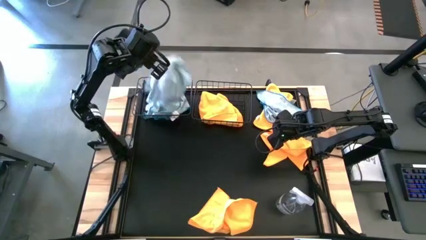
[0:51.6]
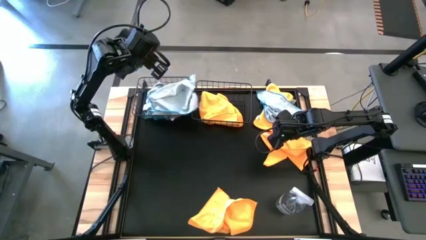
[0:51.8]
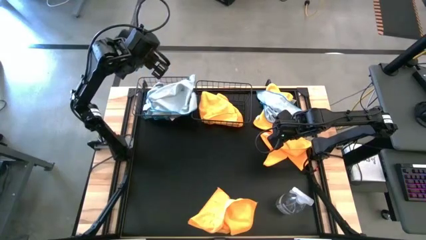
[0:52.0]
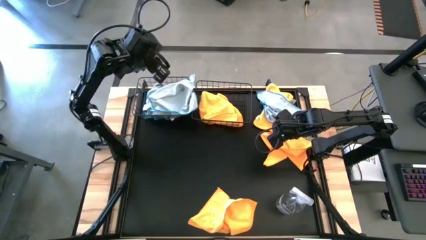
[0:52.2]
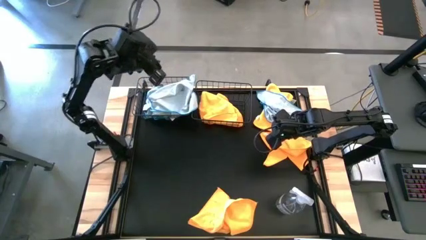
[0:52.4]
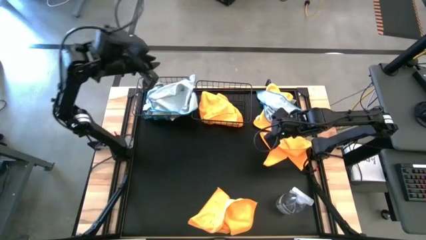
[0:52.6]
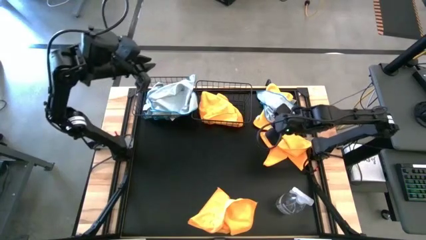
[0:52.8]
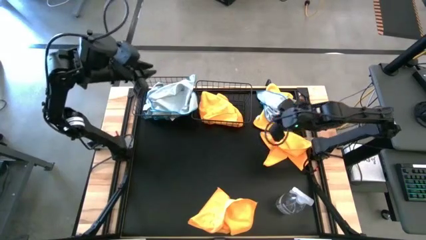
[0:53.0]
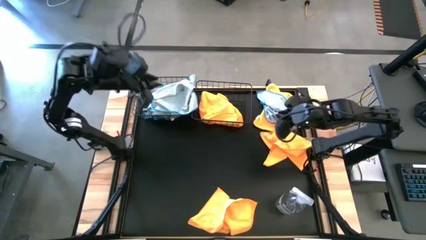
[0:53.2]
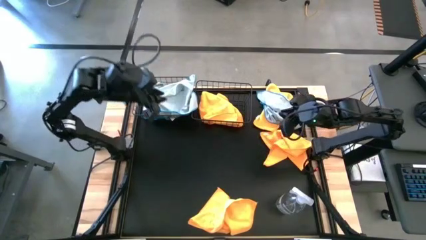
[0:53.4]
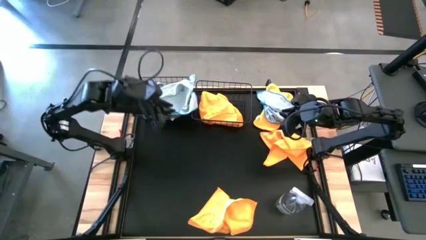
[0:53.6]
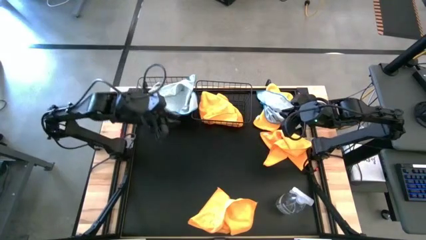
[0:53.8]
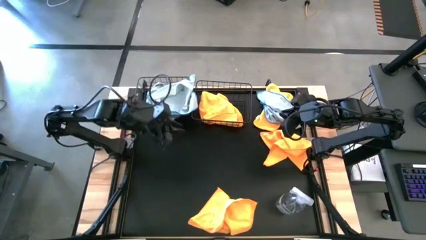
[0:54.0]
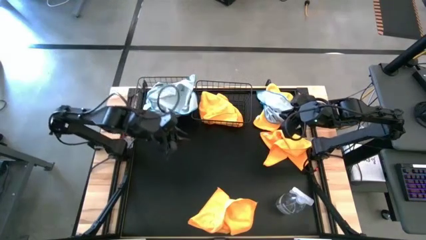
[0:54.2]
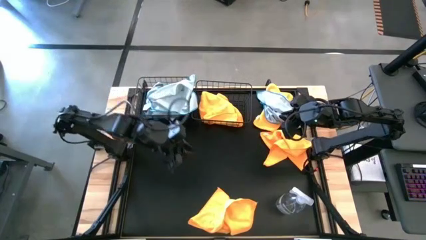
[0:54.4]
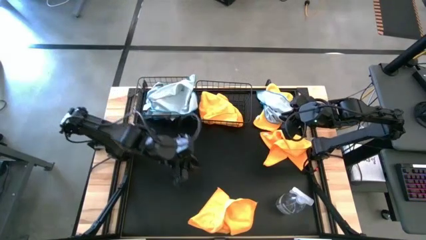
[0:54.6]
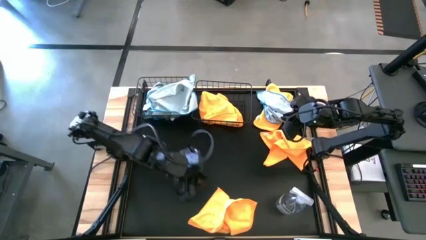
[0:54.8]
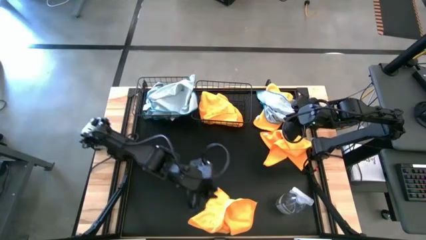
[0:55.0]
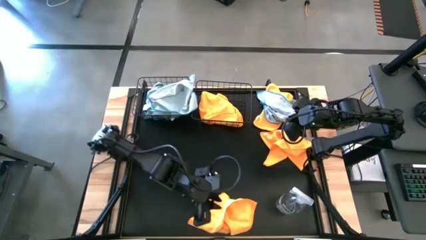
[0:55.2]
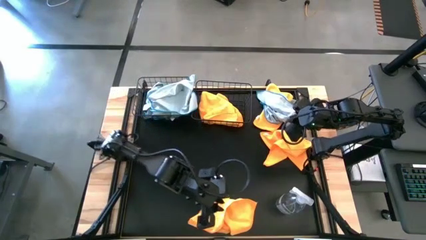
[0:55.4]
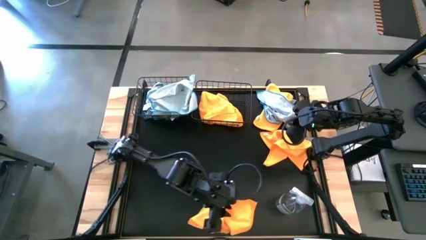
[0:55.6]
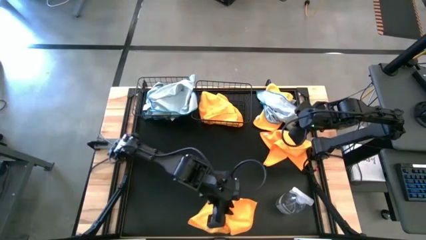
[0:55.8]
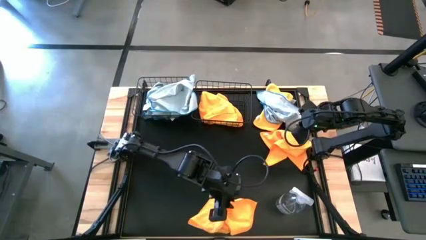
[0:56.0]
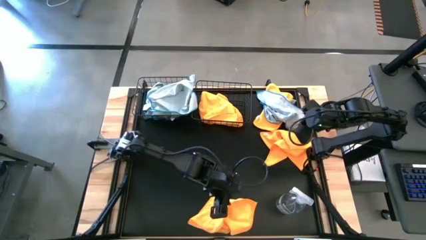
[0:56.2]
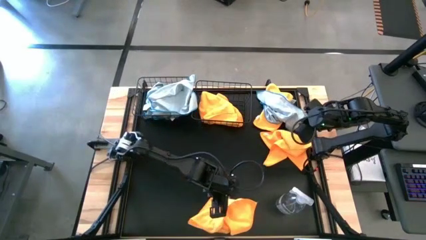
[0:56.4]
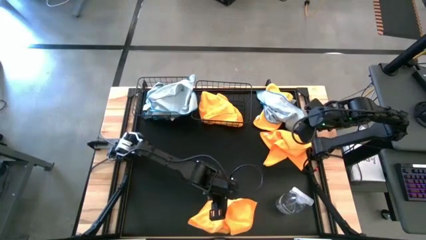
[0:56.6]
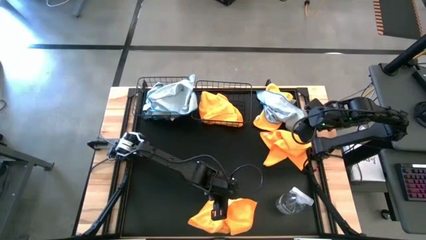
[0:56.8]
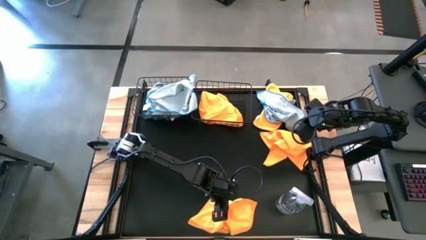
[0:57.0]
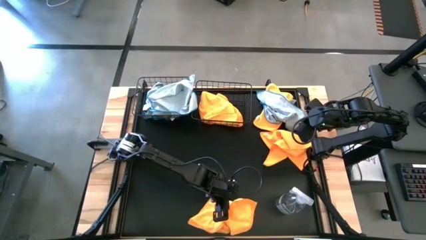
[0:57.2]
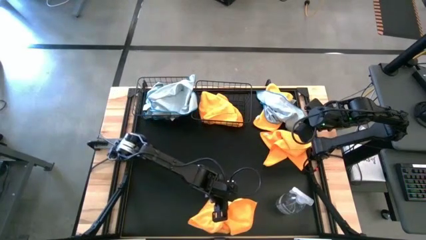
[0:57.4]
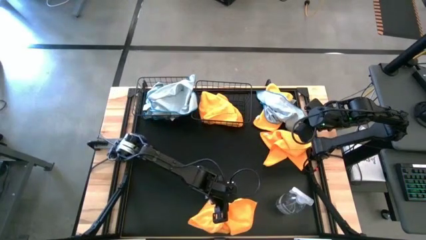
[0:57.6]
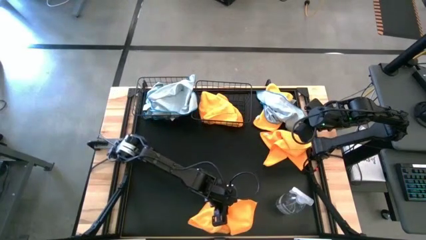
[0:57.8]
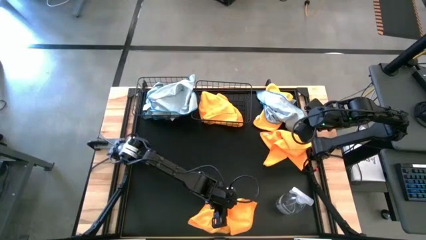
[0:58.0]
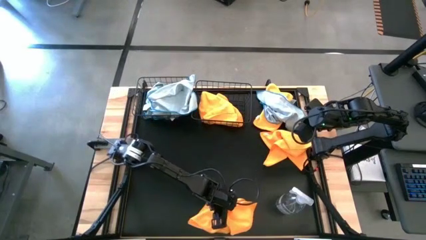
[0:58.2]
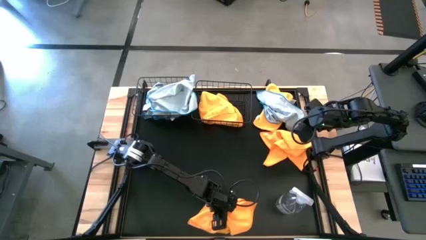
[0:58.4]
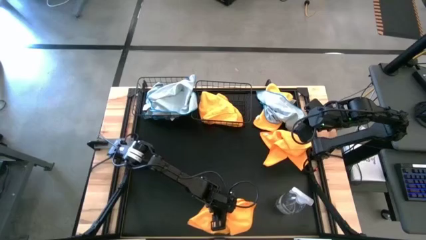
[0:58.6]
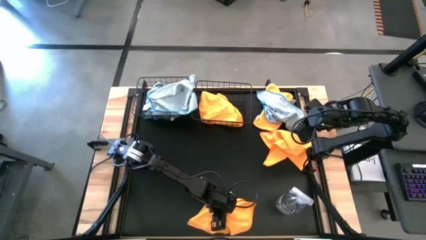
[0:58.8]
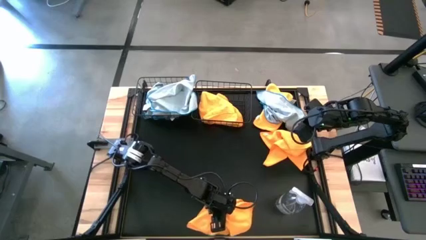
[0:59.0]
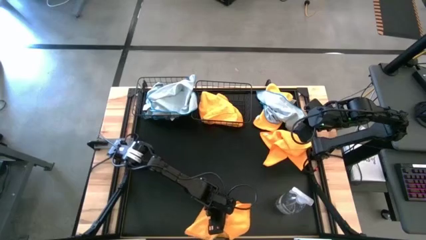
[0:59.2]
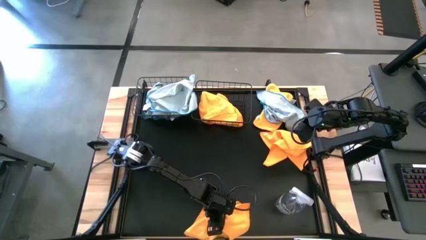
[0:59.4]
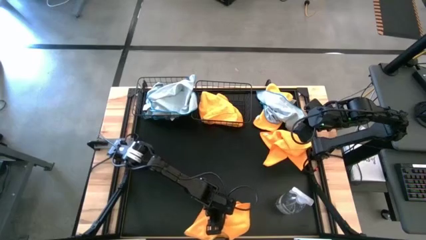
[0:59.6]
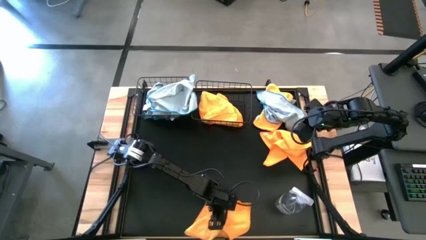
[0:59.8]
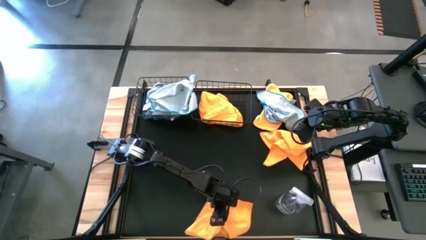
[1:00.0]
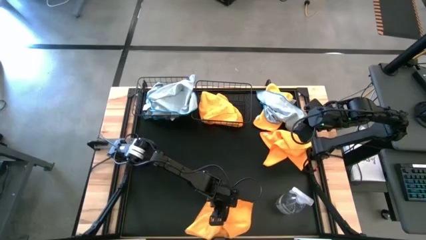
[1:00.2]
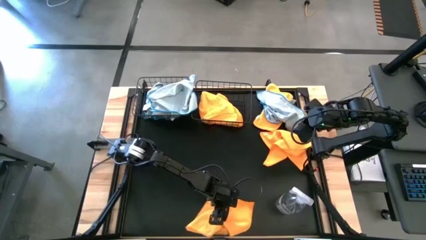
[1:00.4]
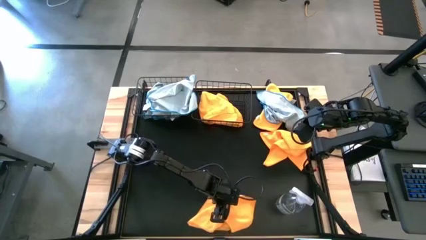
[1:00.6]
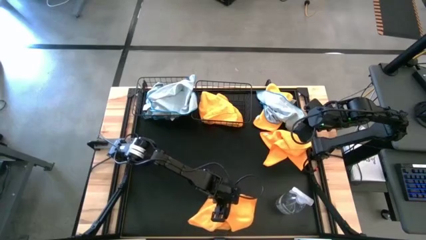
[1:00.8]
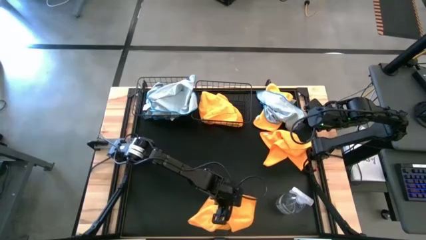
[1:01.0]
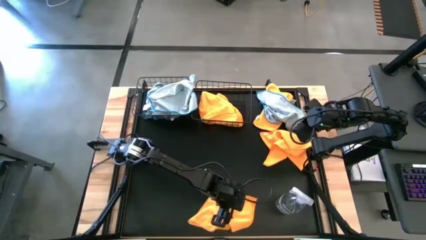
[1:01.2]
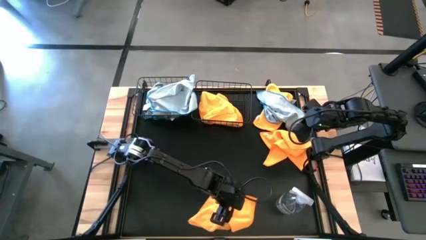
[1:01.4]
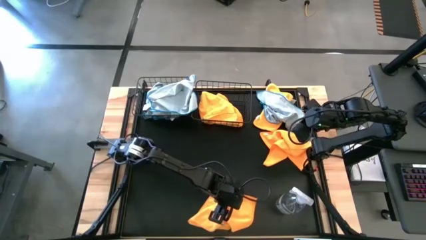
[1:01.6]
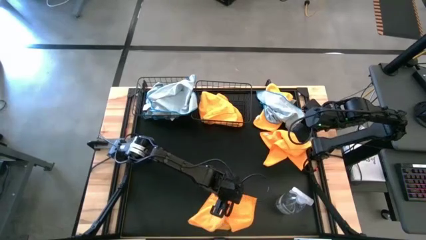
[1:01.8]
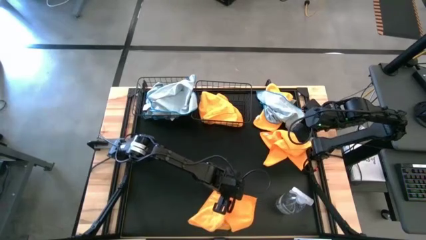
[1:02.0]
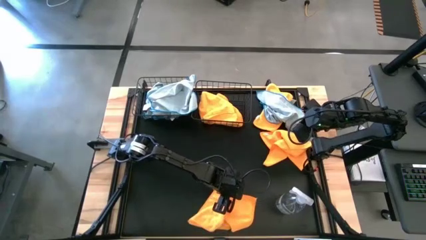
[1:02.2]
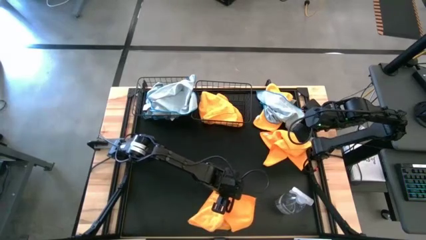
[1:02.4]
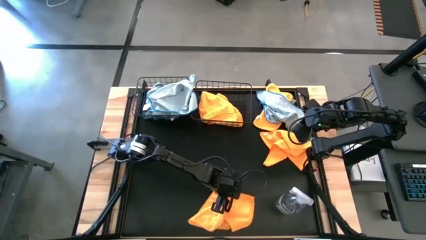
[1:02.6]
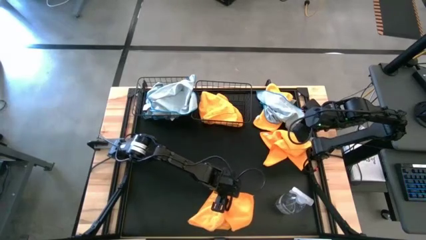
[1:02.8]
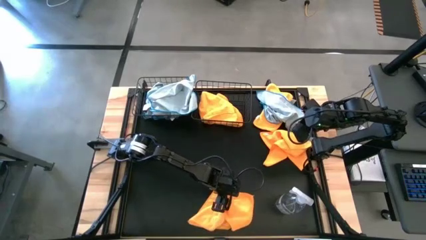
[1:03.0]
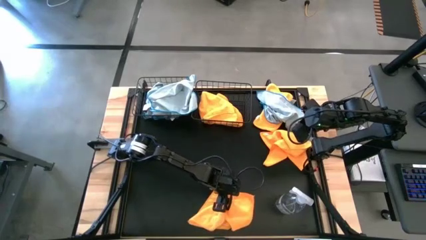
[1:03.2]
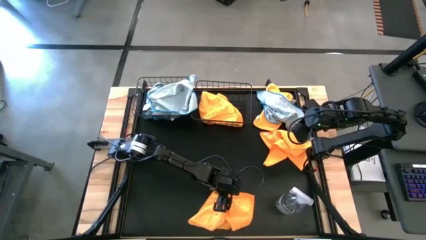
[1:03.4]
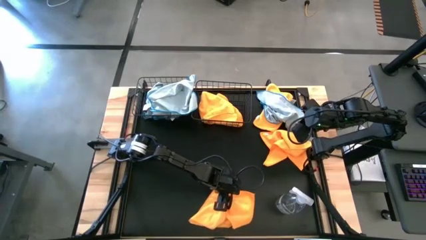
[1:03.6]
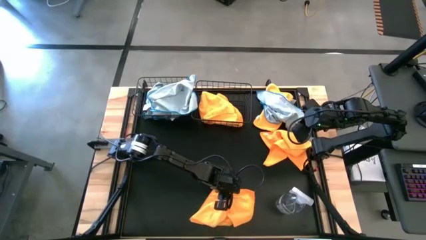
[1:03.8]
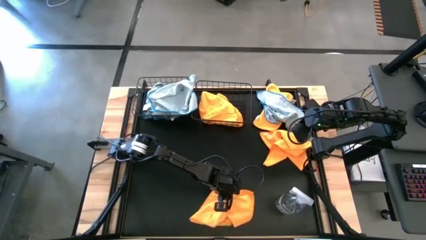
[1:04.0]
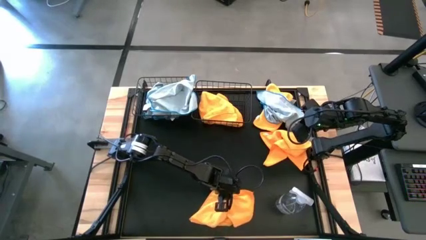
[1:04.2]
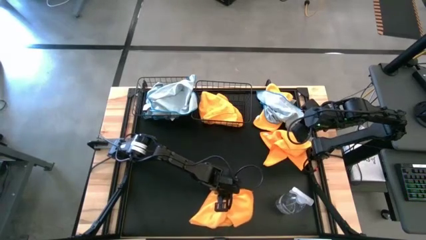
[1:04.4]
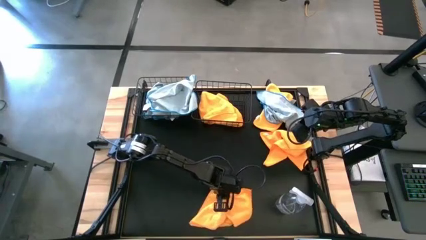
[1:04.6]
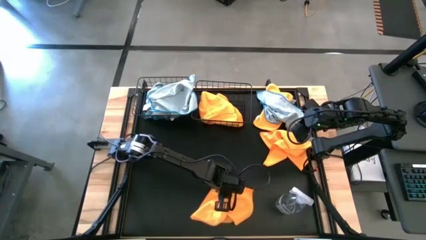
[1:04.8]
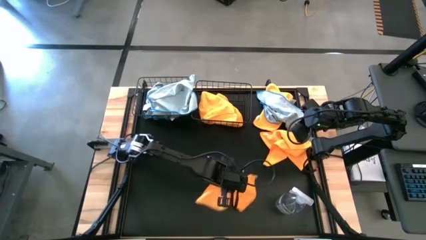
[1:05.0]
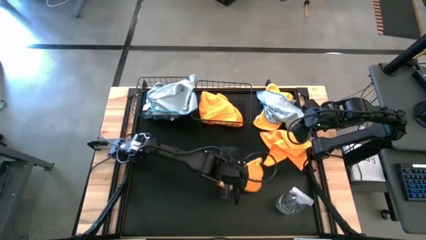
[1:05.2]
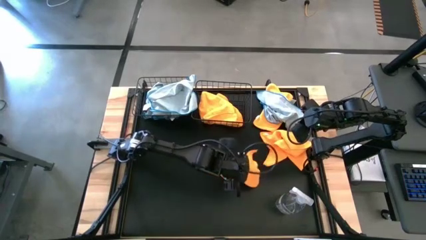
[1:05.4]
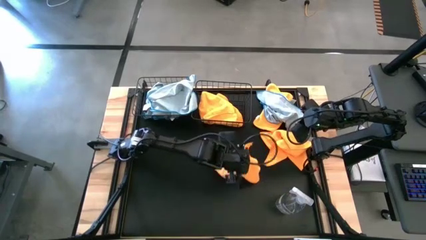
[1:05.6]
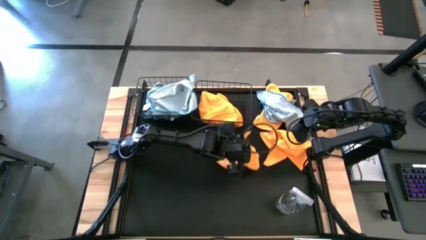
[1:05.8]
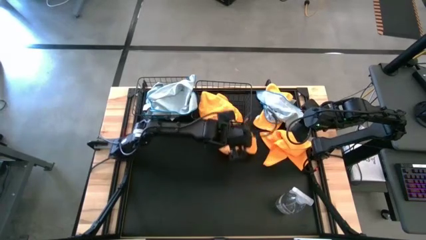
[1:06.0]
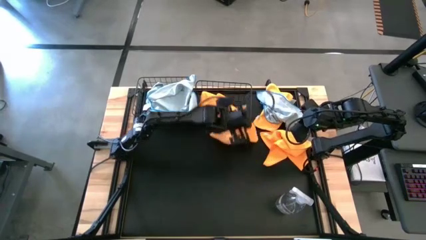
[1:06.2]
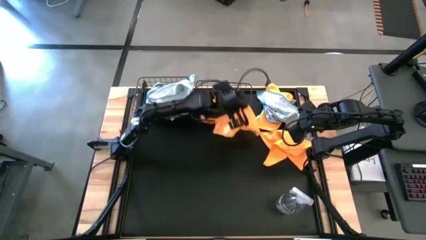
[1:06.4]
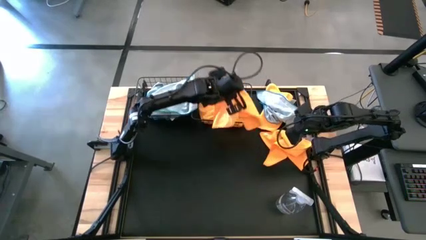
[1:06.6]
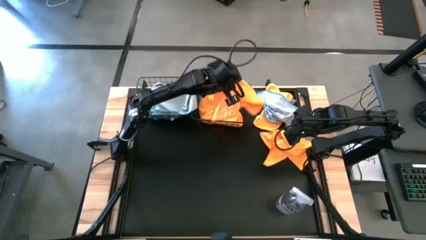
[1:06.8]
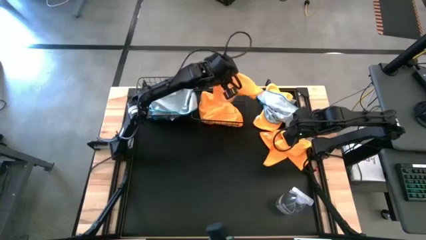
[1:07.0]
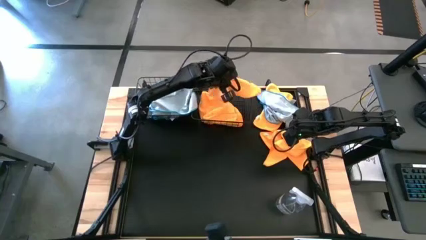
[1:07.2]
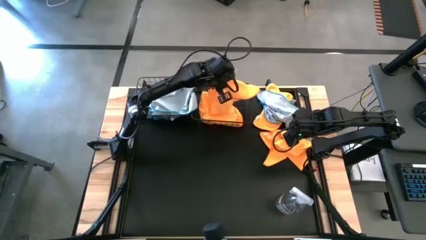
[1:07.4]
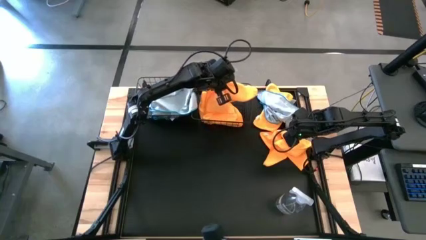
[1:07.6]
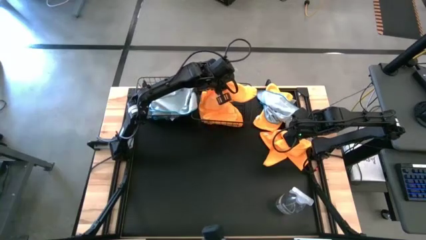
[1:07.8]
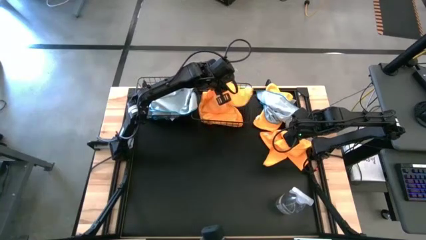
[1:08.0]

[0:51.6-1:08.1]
Task: Sort microfiber towel by color & place in baskets
Put the yellow towel into the right black wire basket
